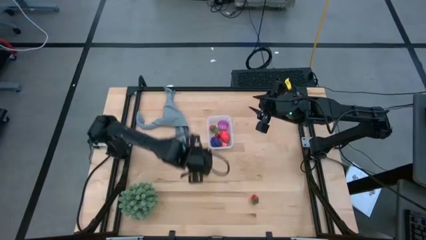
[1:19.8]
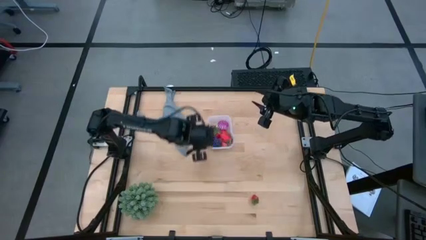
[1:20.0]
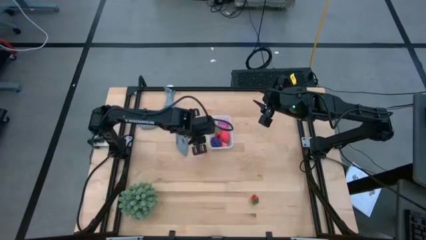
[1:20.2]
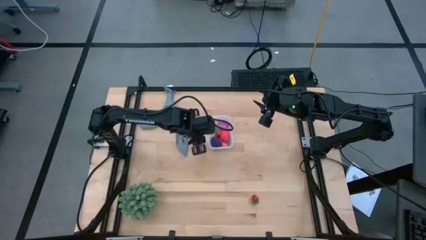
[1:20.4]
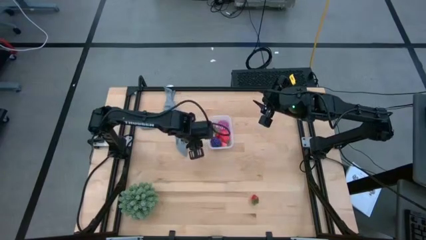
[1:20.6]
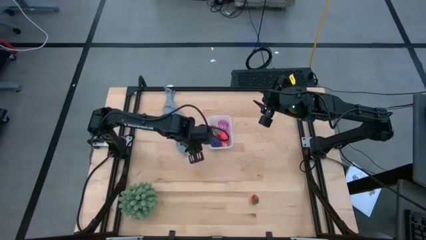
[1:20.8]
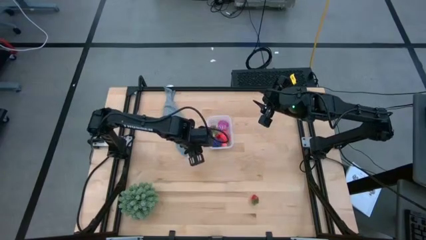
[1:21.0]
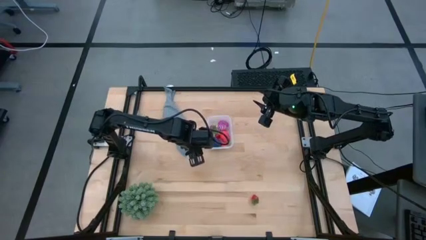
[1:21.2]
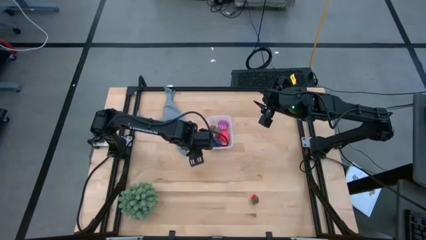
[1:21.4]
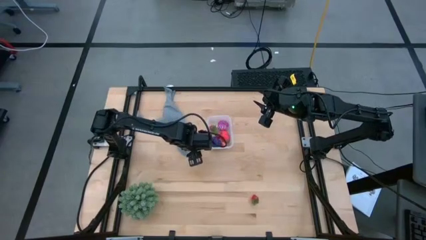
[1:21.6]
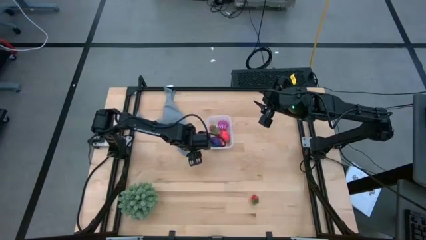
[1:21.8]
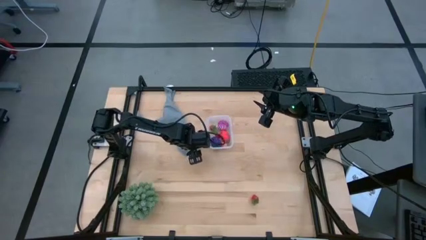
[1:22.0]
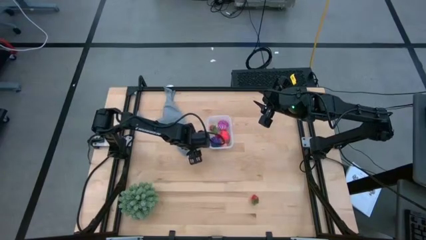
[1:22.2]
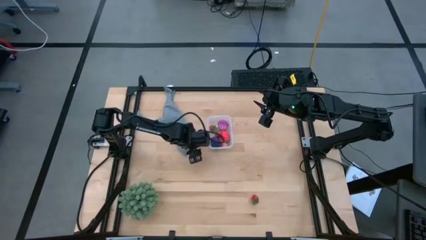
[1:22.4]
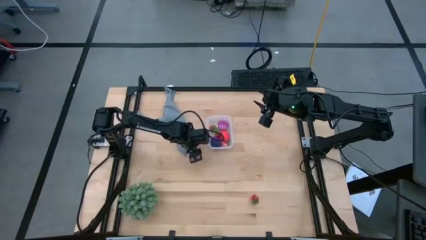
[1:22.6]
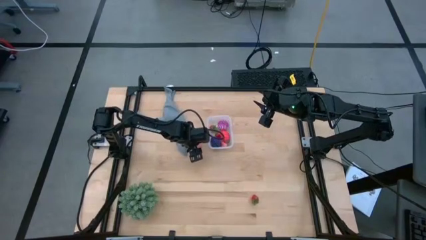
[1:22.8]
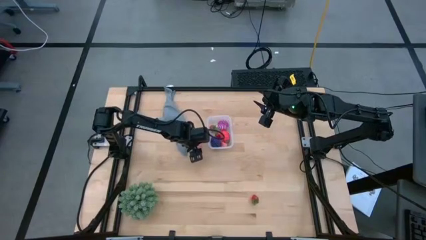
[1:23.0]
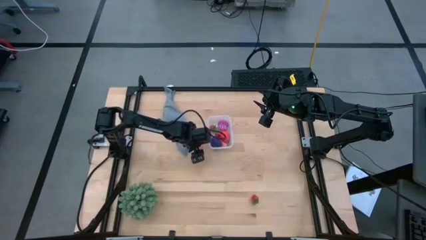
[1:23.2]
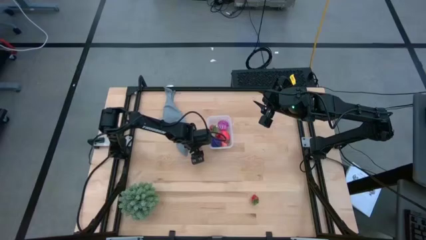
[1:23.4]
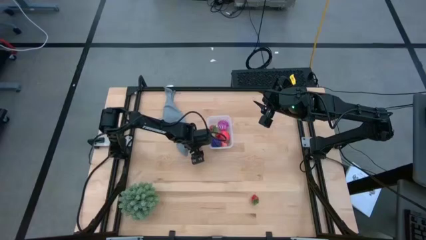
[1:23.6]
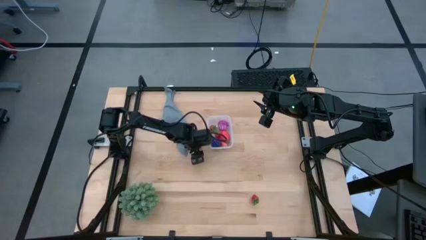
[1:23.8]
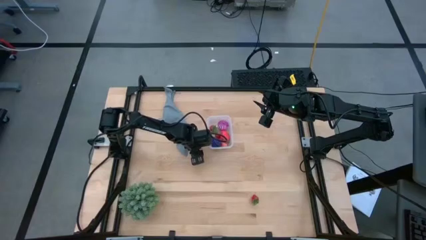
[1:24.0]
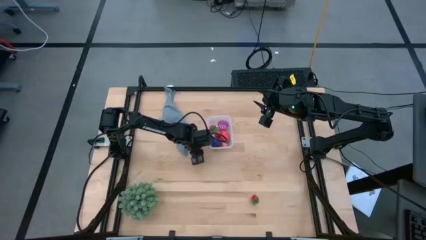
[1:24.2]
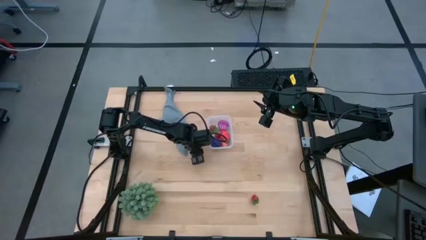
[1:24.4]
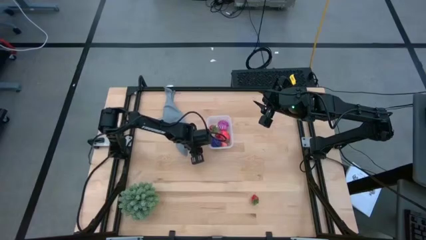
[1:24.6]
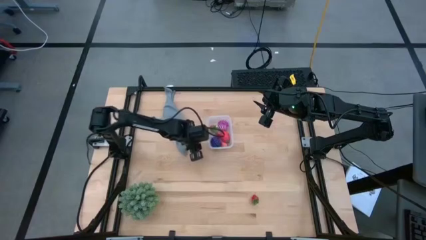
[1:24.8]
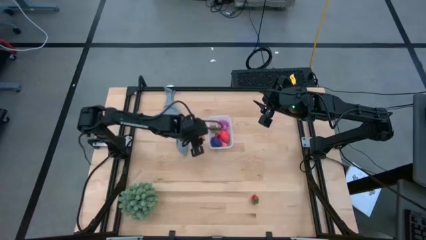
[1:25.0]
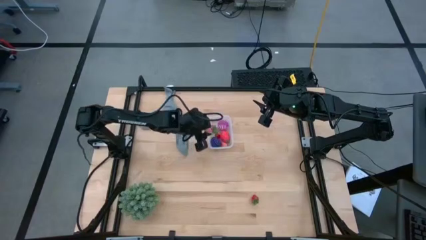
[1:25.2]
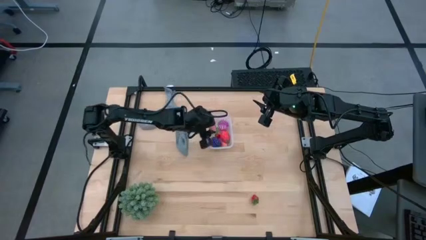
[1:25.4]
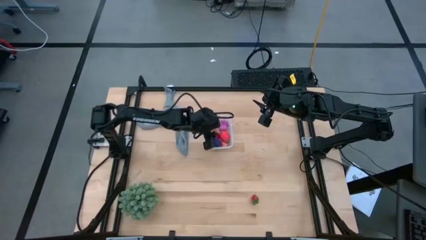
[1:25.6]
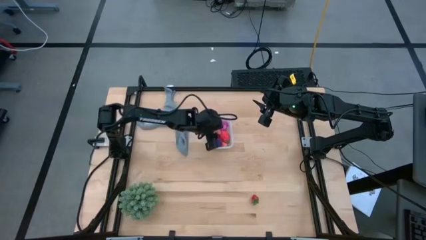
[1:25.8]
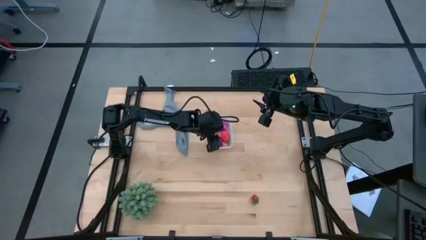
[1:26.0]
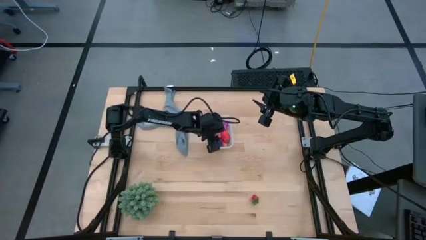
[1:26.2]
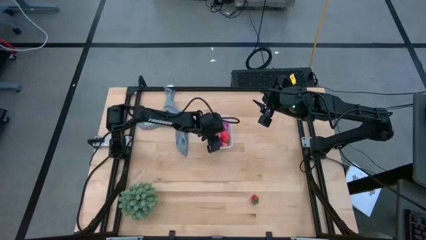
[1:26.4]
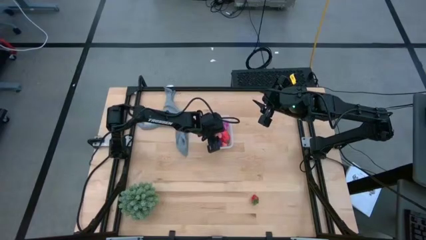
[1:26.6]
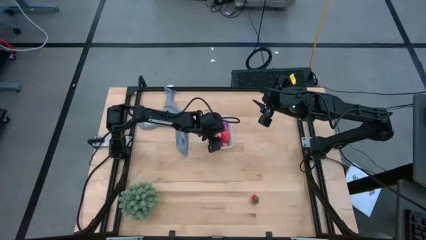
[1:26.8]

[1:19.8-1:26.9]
Task: Pick and placing Produce into tupperware
Put the pink peach into the transparent bin

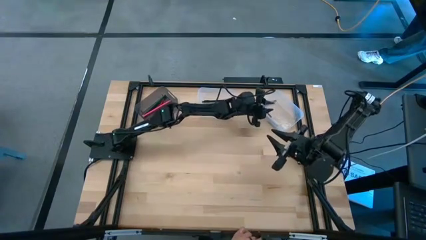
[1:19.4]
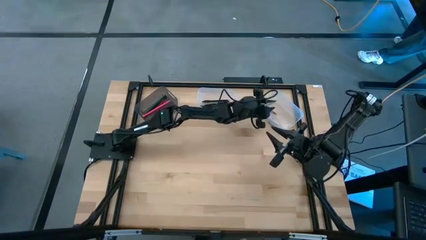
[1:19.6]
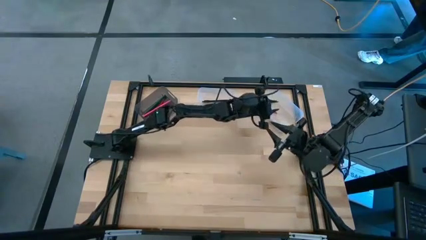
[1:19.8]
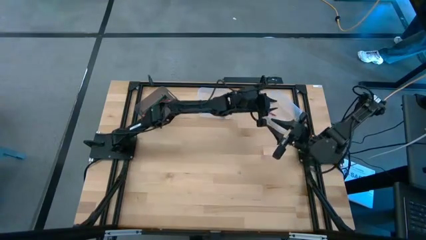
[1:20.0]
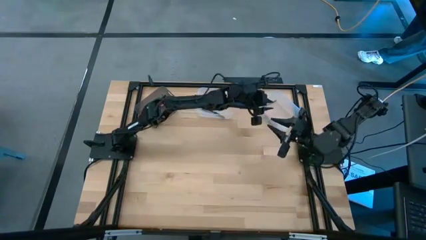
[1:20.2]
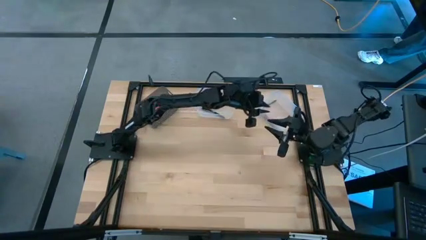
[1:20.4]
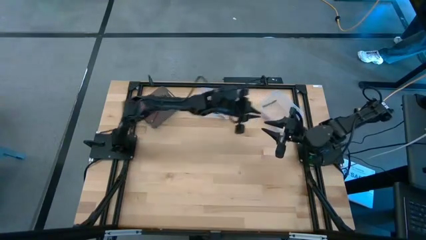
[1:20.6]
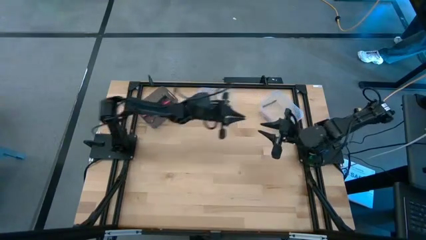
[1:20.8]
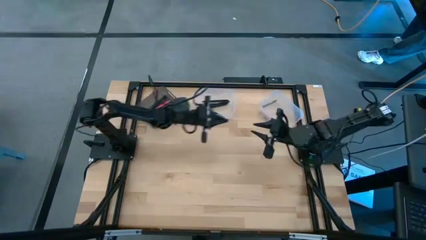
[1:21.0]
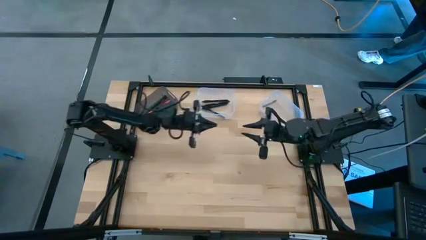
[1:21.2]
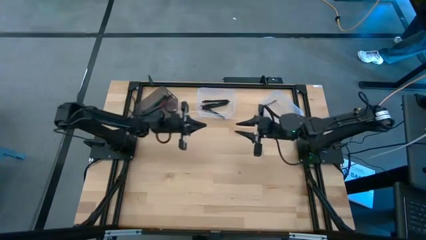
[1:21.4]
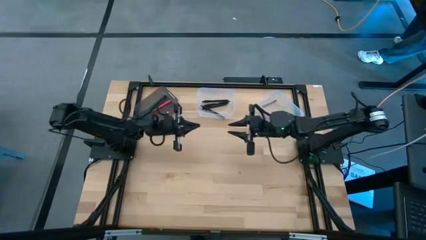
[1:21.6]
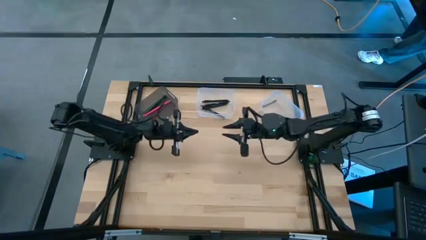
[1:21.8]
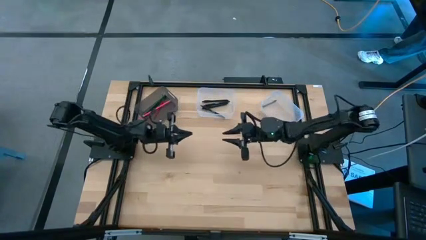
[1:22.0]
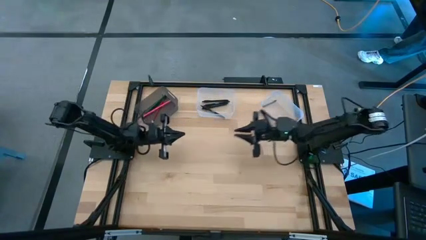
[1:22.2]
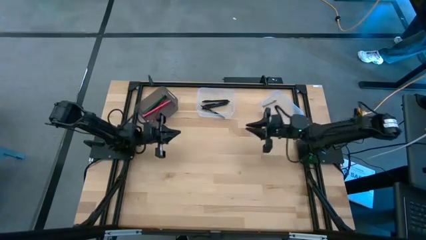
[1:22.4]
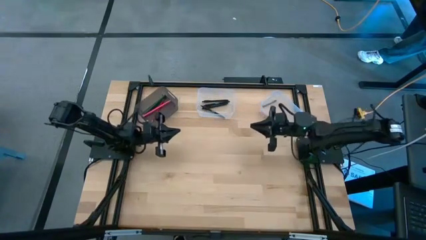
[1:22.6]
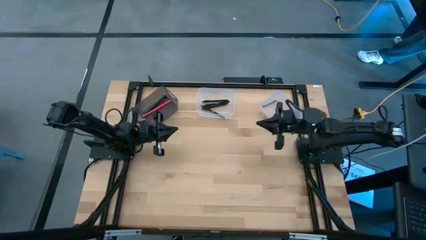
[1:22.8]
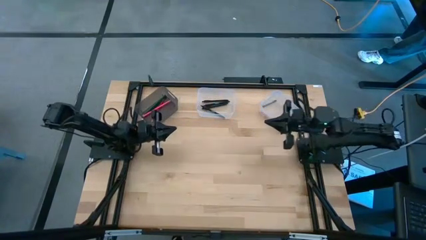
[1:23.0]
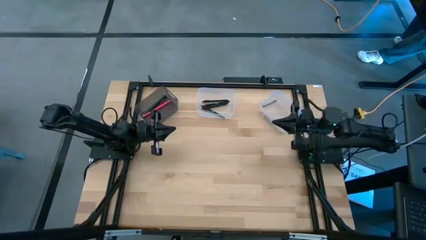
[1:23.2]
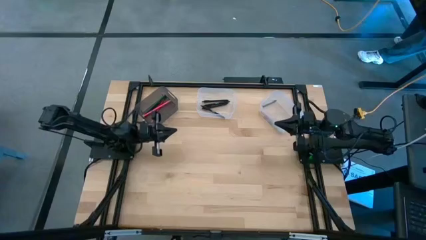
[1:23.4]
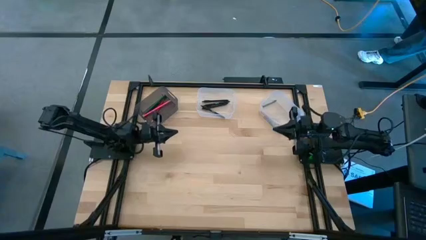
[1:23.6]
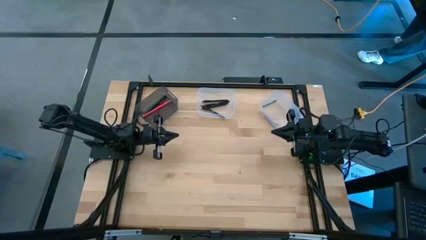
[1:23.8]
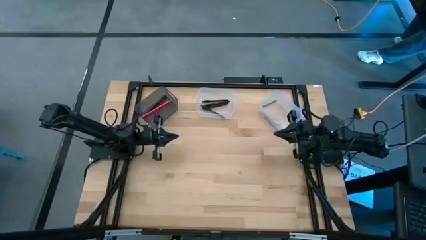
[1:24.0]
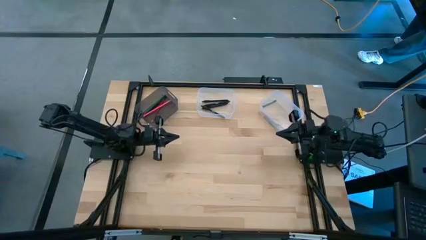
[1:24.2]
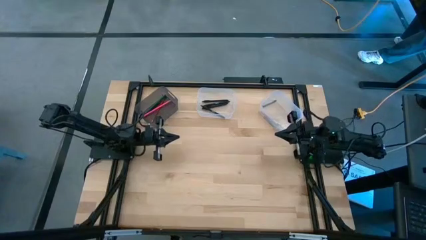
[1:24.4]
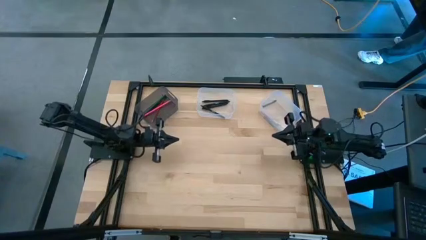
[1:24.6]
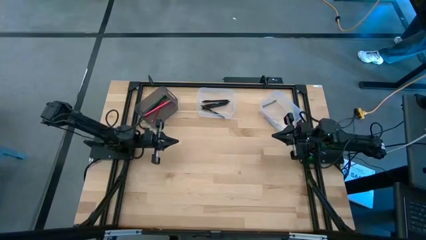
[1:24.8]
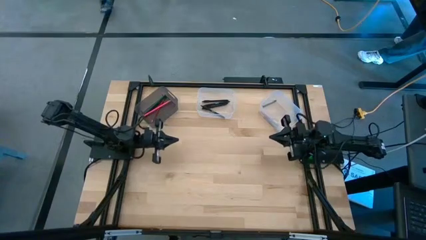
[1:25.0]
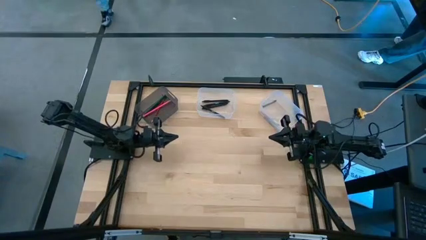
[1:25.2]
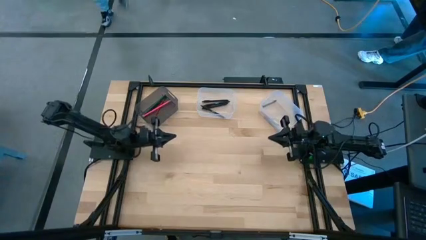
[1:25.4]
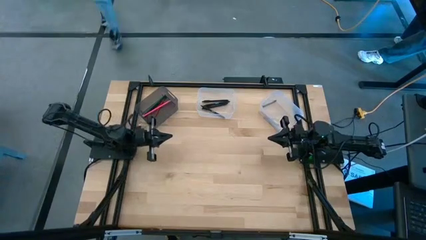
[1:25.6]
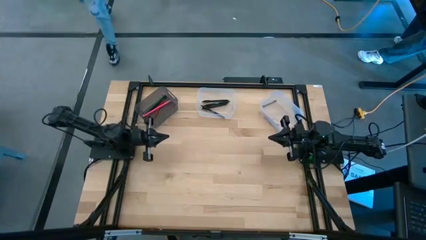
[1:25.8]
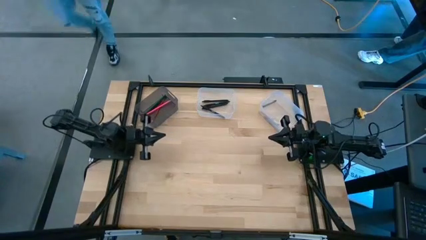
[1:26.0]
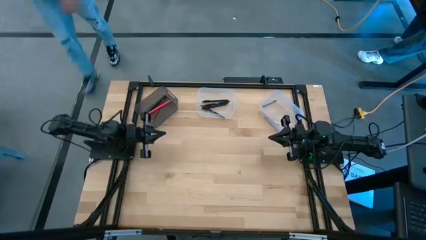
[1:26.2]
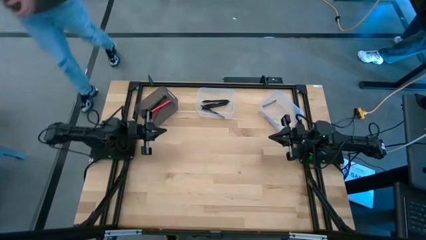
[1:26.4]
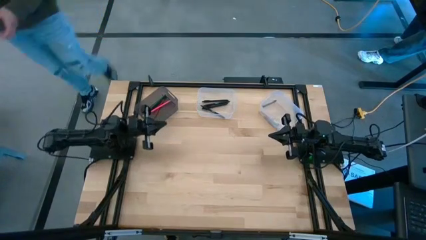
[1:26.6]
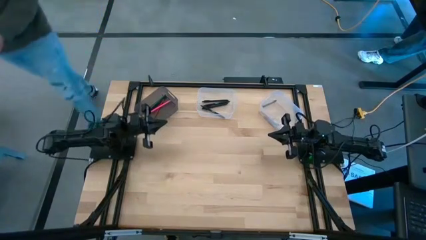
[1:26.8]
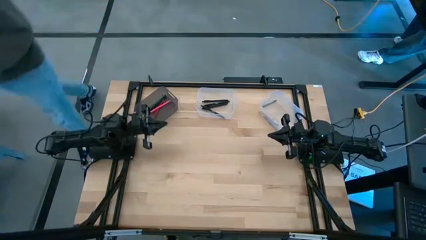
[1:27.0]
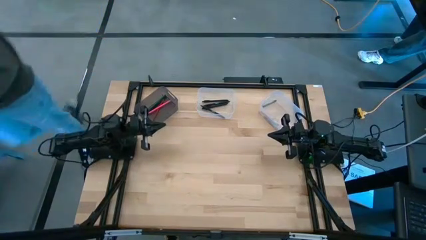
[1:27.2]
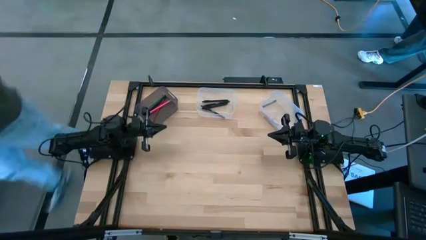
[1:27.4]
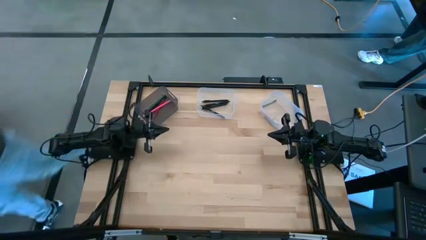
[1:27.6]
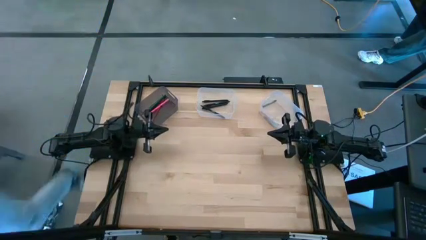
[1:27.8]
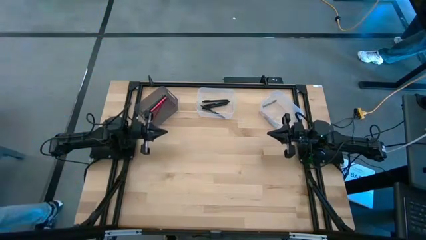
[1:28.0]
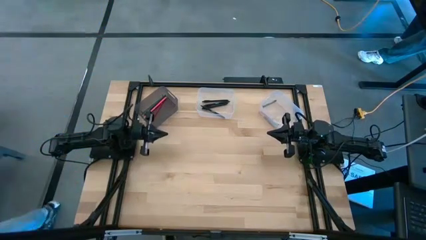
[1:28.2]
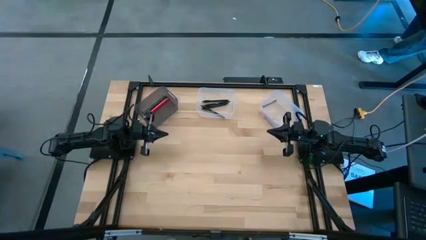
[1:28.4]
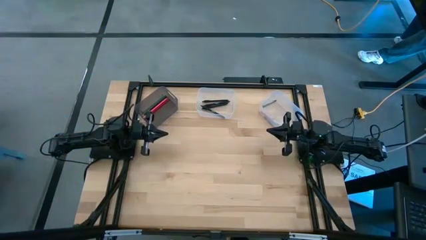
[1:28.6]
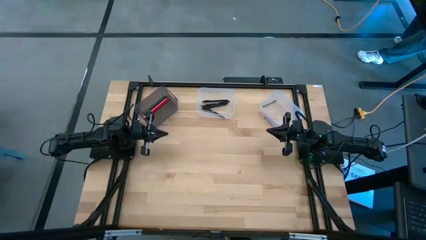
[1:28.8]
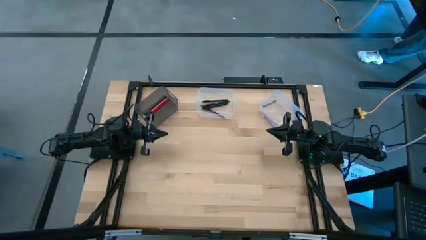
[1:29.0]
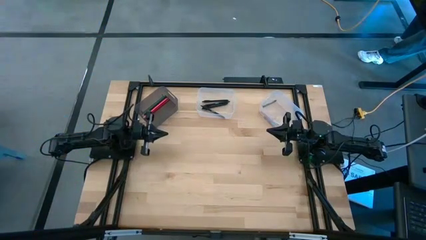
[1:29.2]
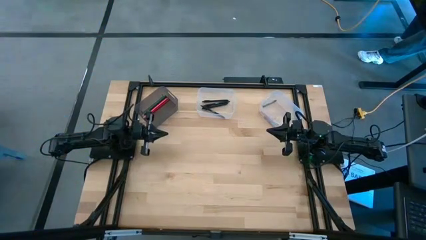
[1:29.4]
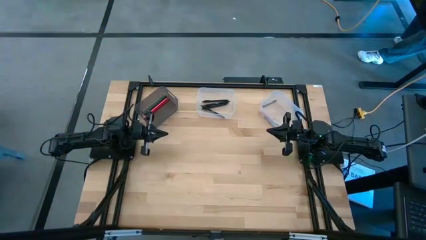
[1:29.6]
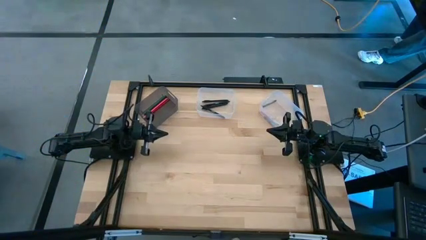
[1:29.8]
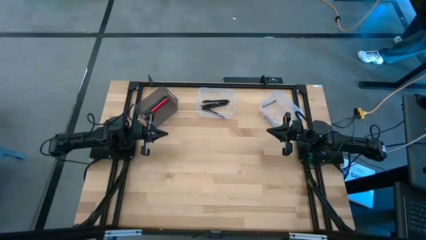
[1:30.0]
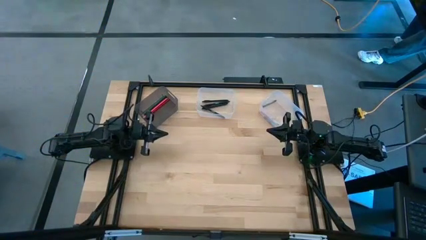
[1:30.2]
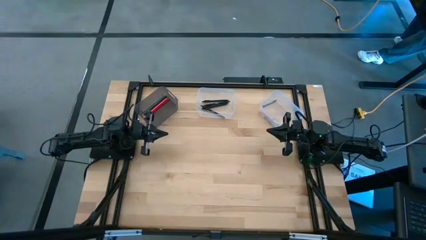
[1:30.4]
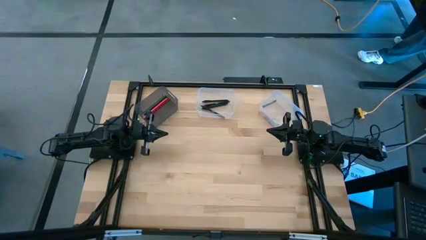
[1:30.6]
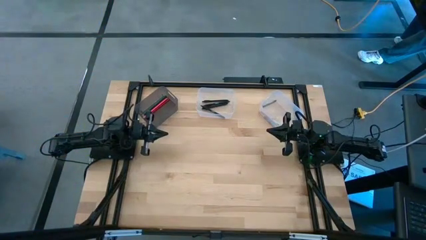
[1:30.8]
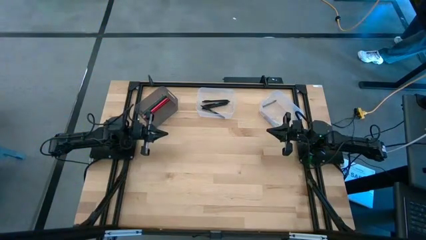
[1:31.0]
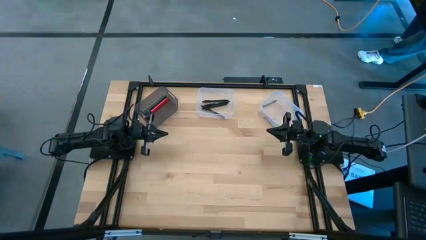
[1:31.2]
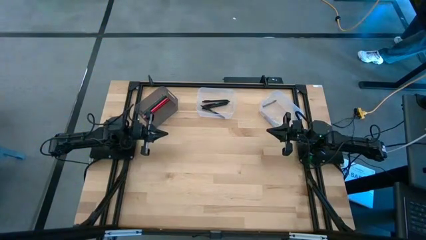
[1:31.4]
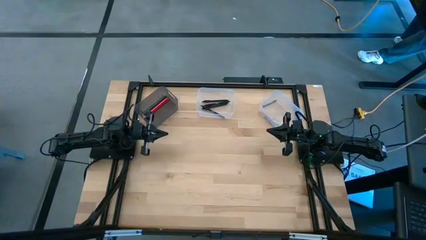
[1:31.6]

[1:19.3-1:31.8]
Task: Sort crayons/erasers/pens/pencils in bins
Return to Home Position
